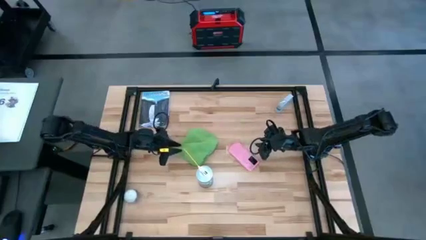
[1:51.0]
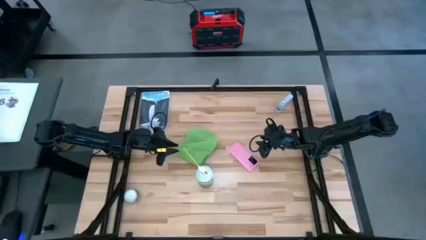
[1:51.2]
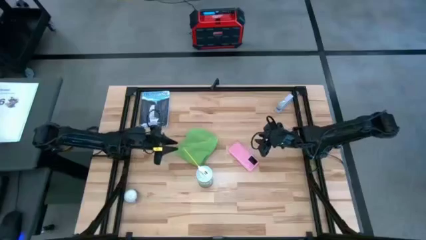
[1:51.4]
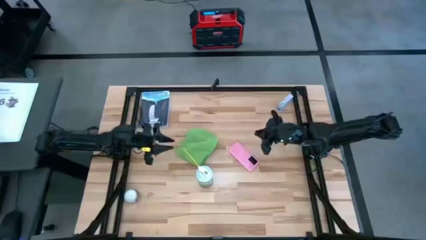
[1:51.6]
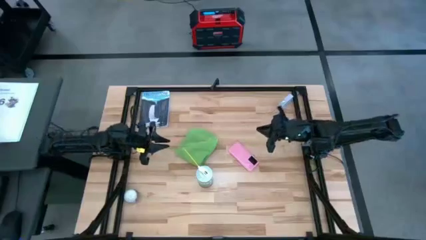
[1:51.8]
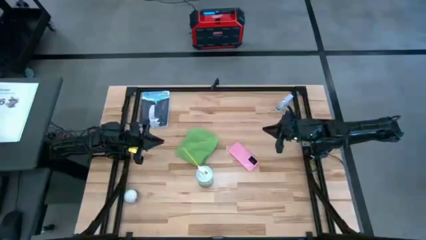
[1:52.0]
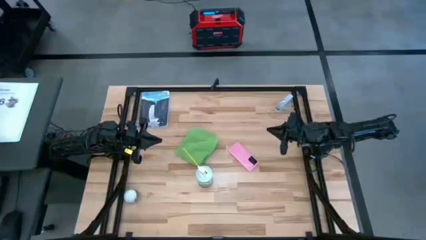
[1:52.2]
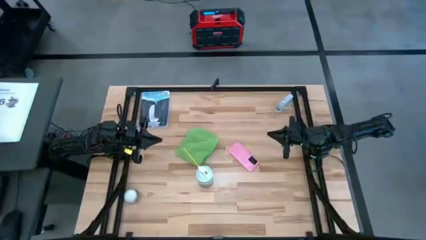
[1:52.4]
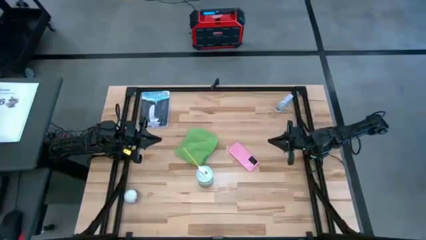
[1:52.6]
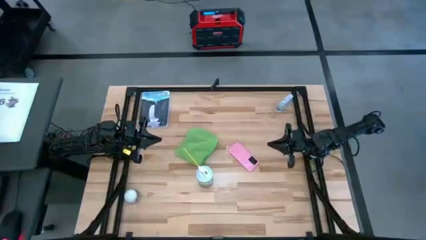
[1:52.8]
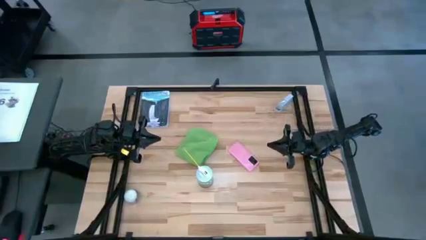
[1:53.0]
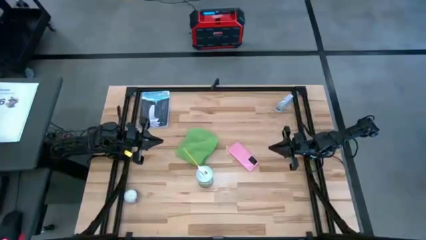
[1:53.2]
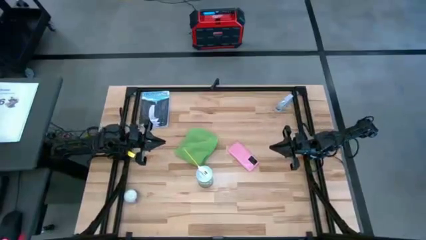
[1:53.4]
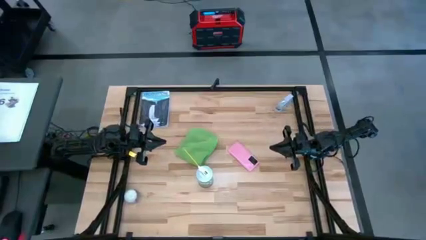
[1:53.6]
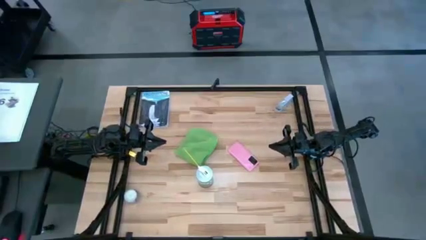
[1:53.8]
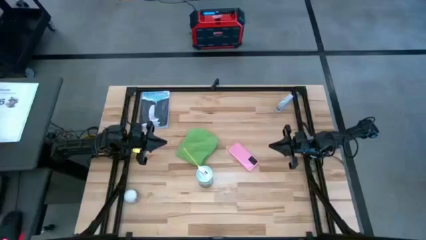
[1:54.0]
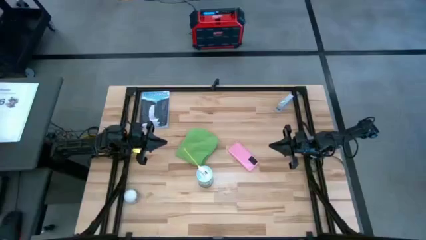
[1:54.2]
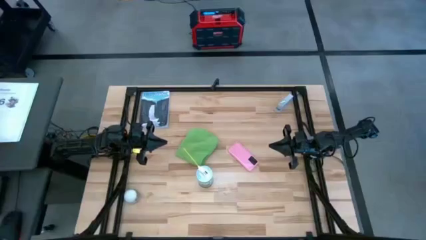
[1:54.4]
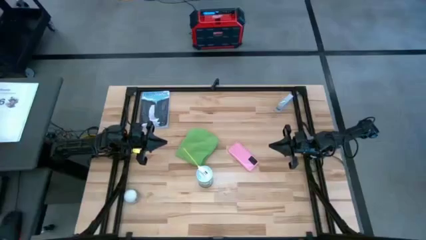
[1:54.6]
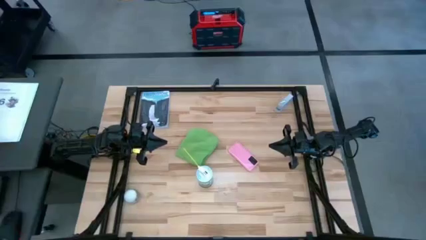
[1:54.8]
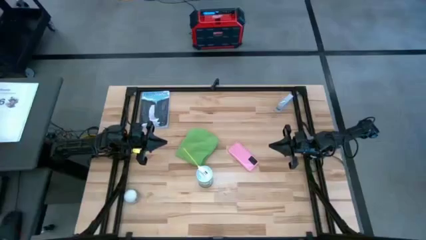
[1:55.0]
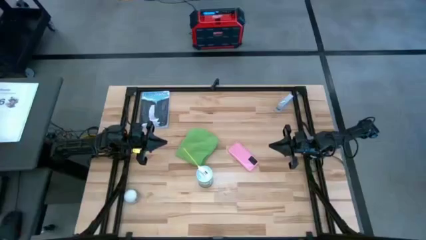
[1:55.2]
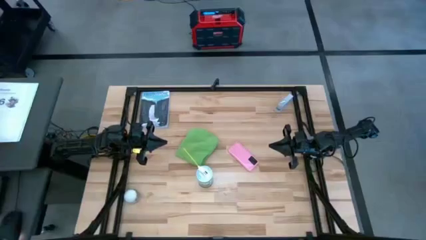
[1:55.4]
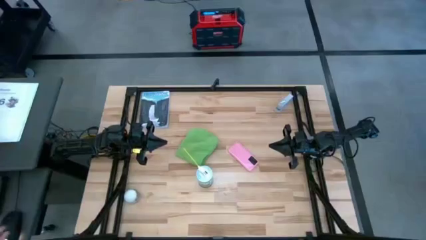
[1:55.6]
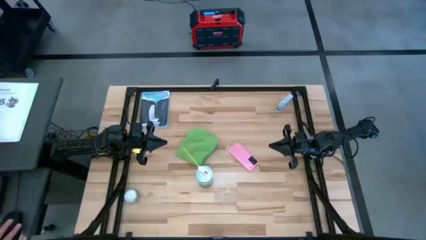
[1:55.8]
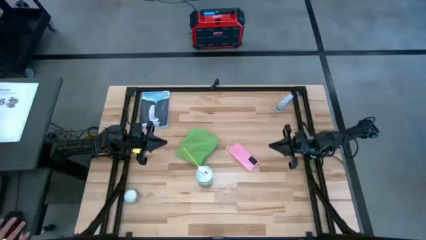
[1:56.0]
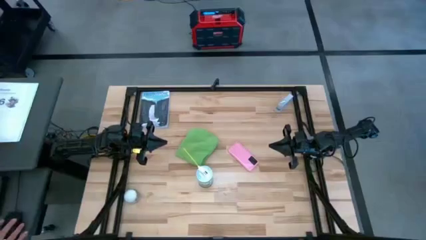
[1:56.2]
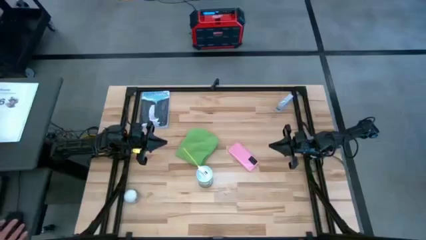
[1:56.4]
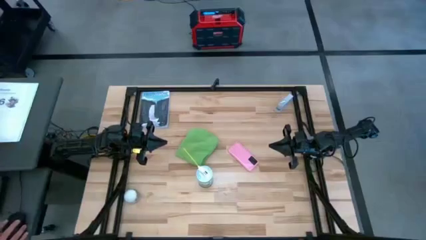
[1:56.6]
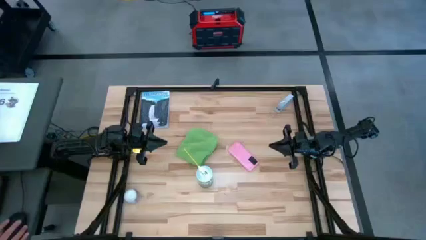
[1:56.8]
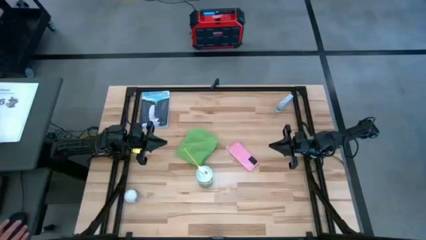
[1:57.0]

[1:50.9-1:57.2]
Task: Apply microfiber cloth
Return to Home Position

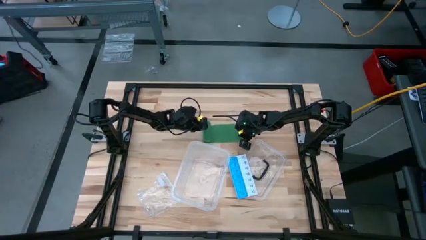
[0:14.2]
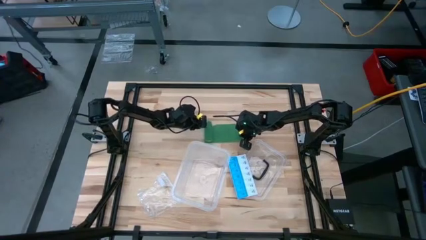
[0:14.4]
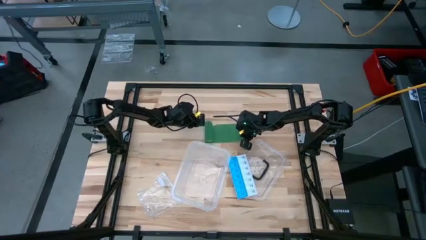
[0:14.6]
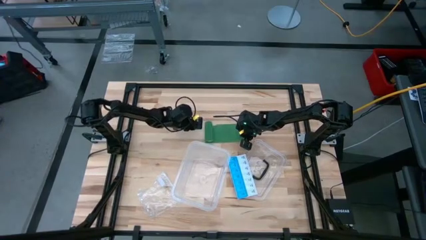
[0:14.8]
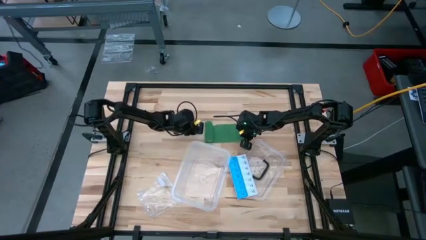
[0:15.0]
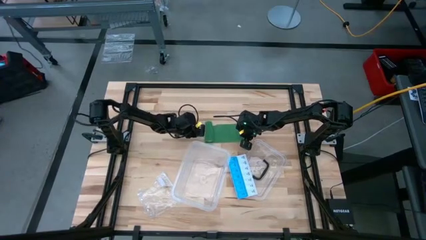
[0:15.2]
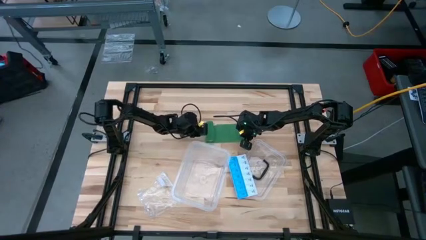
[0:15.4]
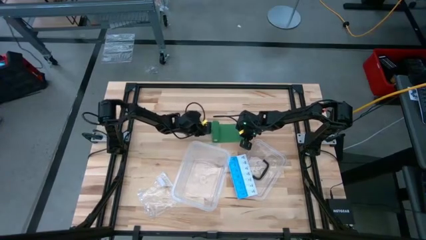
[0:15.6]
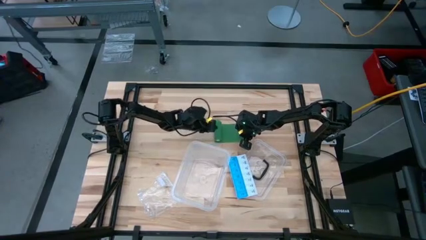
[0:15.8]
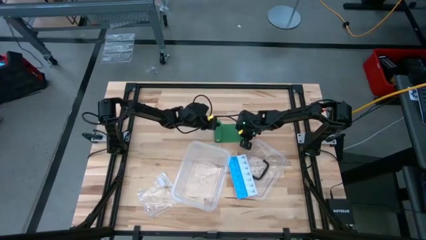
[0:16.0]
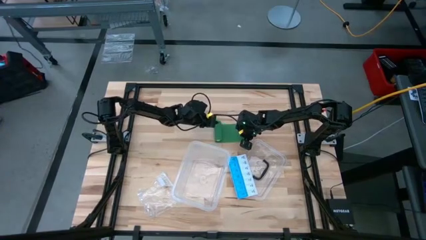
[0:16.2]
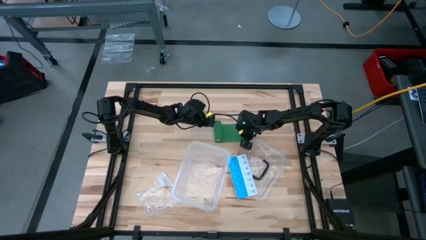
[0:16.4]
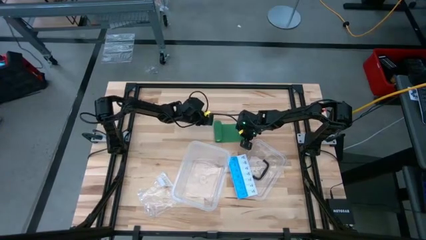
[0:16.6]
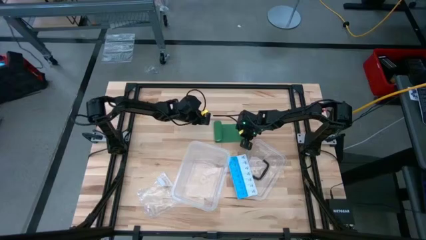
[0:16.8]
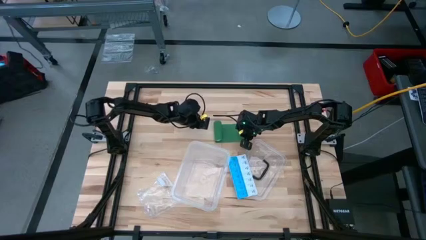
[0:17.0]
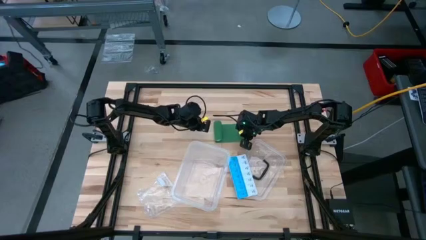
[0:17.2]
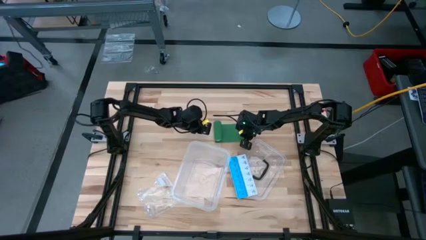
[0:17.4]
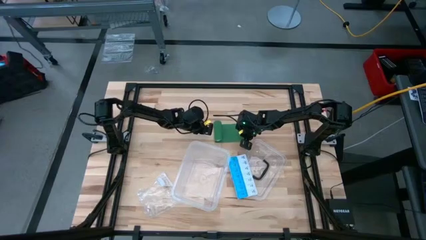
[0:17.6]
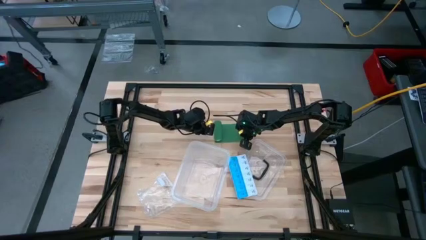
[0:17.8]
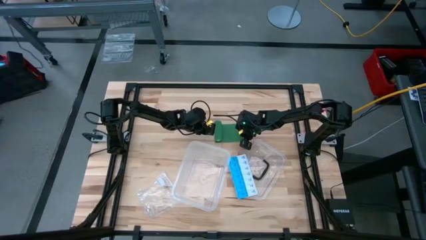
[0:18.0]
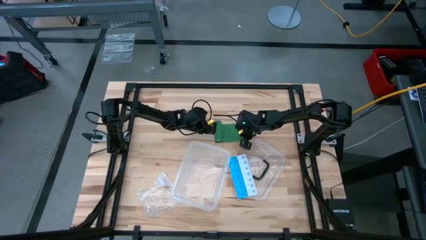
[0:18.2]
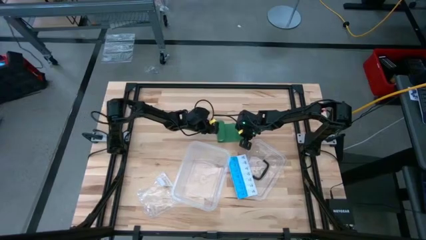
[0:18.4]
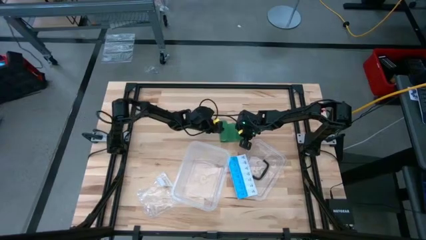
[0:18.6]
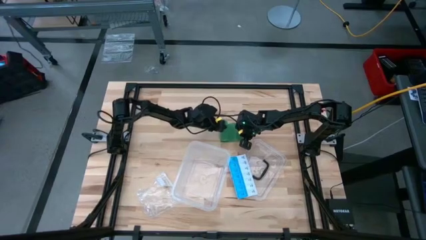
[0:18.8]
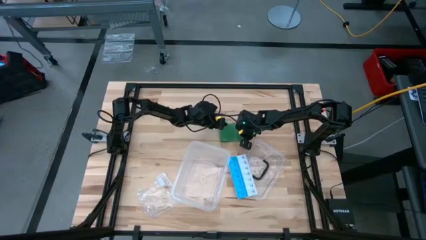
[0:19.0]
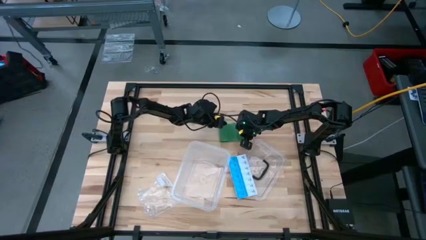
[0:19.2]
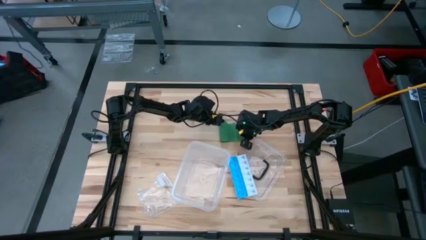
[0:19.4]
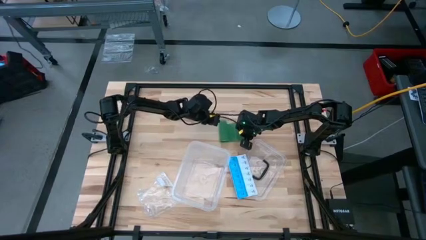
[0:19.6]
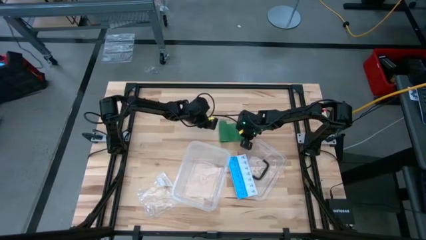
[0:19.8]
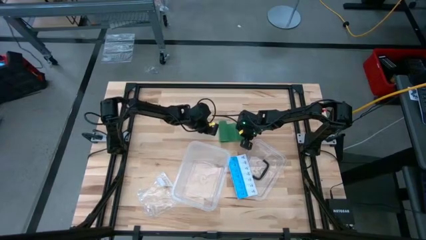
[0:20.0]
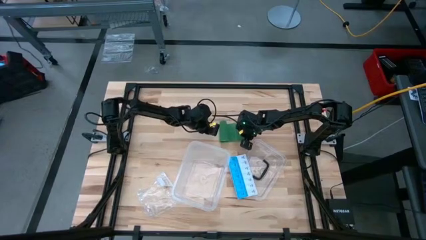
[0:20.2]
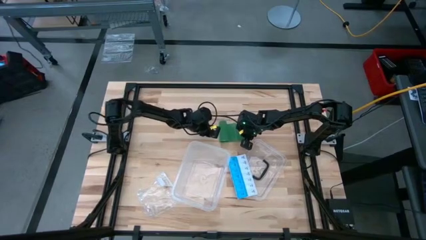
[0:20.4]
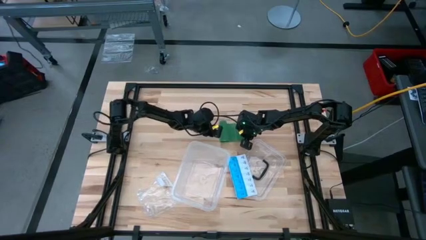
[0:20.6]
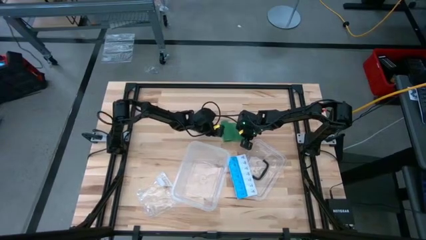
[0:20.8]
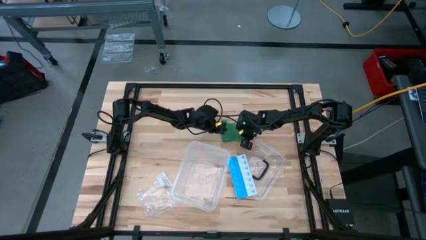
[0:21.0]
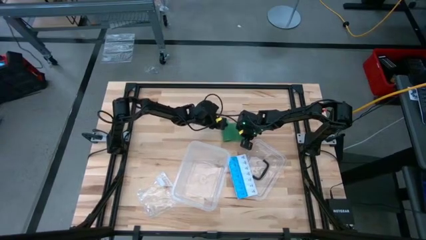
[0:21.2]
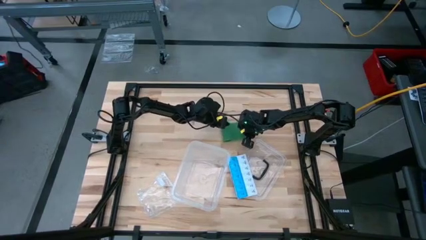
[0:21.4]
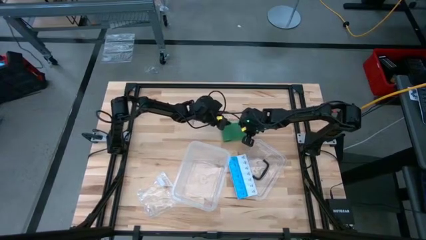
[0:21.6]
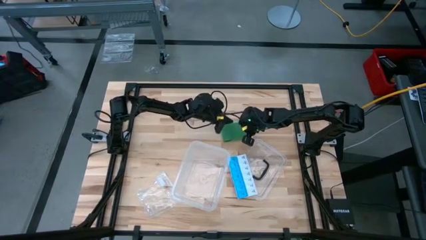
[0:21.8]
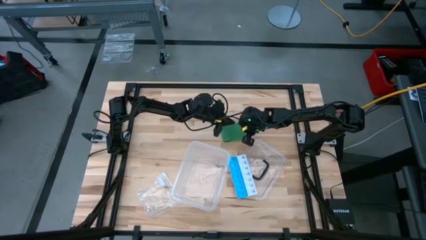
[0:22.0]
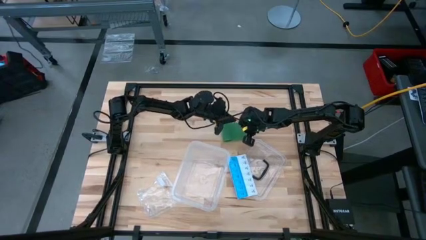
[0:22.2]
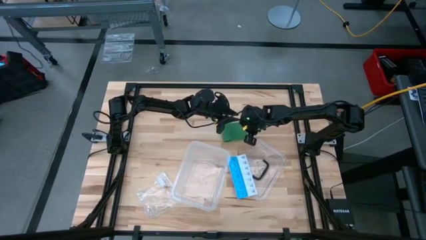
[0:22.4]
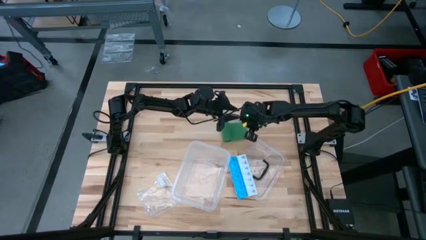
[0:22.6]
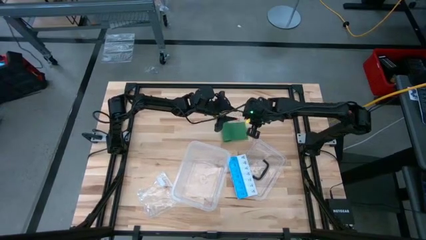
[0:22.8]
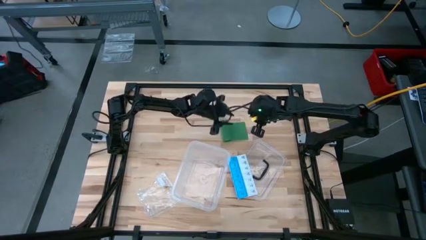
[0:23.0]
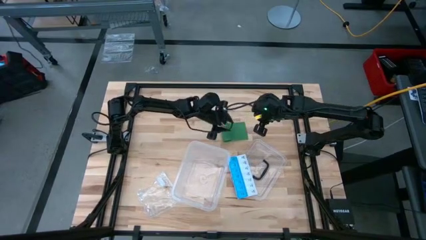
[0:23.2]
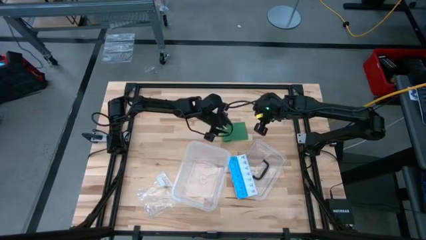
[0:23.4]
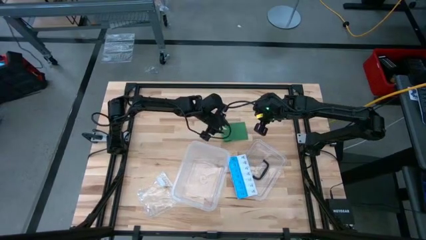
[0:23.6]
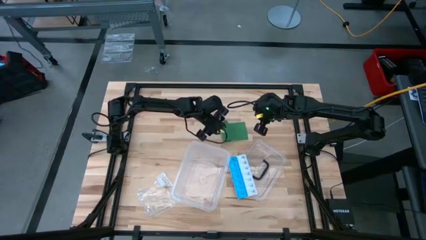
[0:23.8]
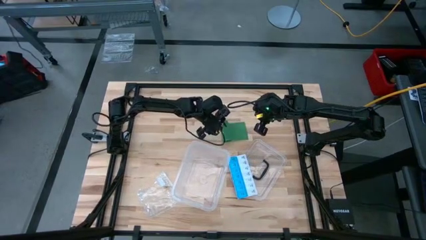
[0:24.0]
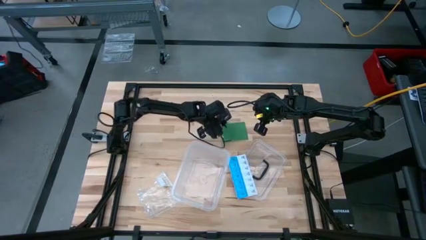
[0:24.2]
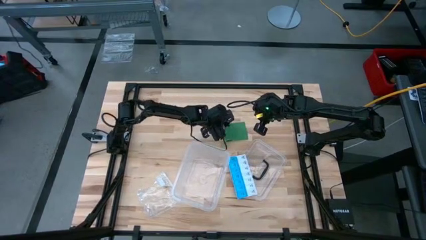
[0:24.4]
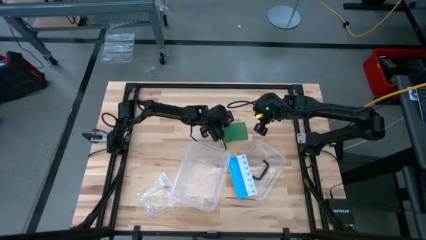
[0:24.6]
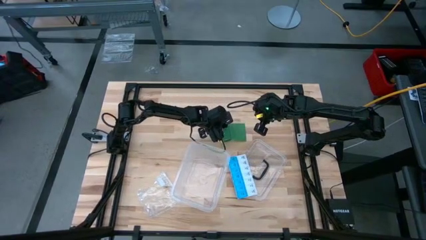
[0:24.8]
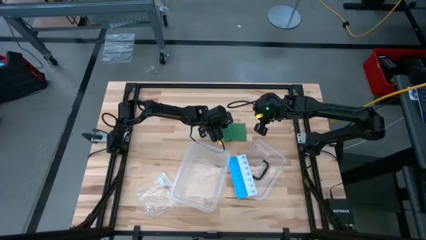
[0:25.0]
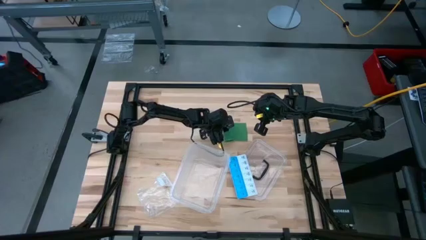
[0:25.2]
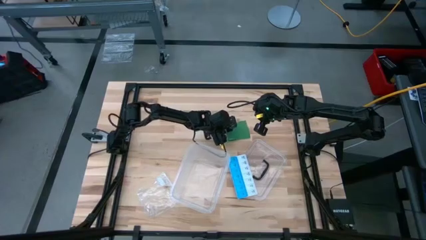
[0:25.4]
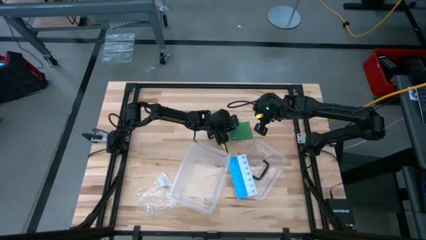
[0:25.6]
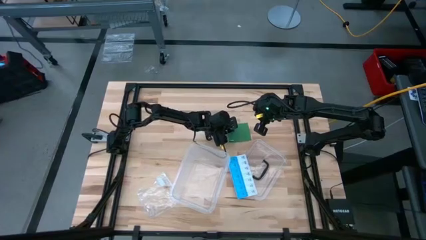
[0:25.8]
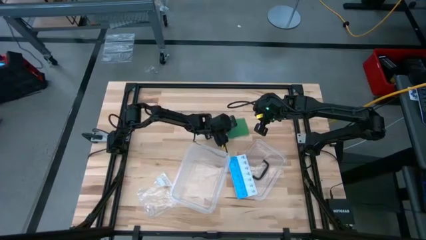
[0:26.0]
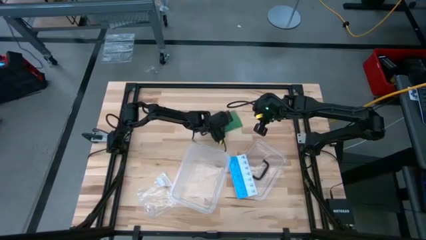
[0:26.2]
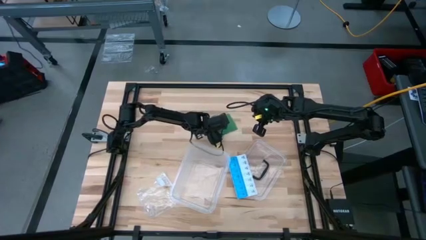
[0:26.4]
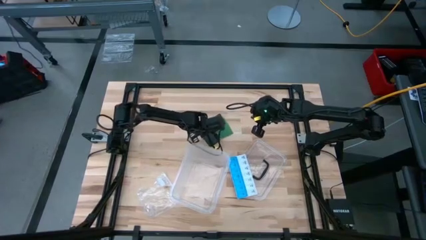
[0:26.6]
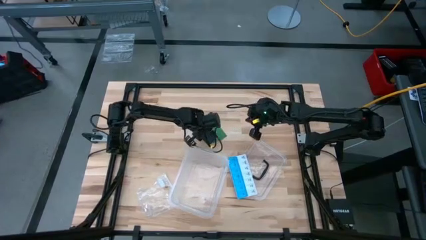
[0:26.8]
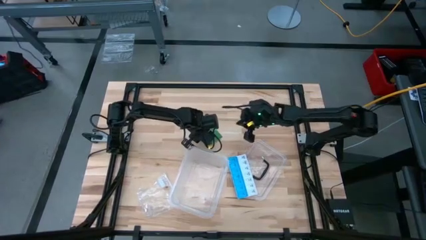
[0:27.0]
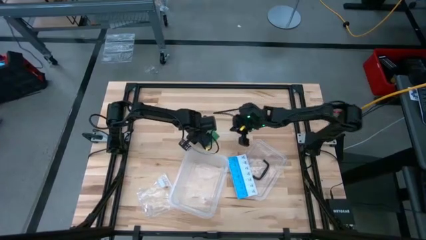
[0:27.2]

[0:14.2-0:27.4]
Task: Roll bandage
Roll the green bandage
